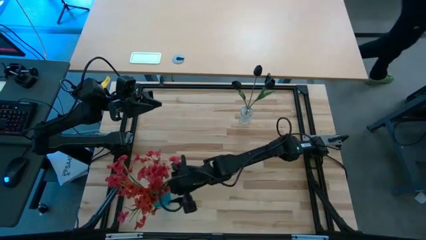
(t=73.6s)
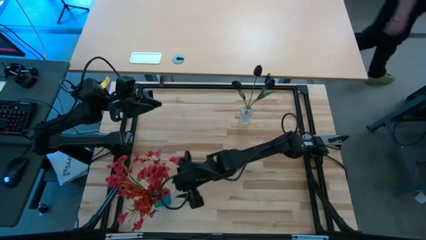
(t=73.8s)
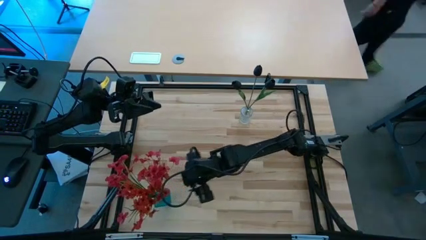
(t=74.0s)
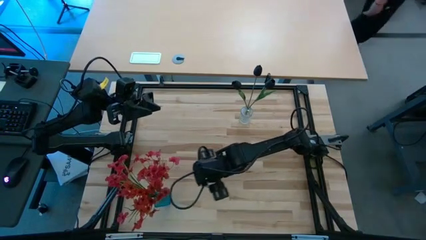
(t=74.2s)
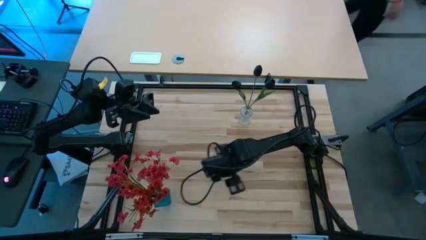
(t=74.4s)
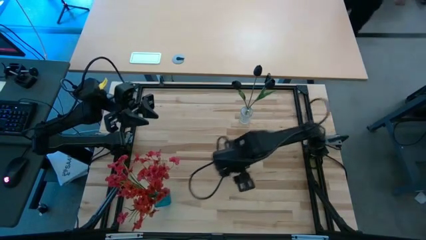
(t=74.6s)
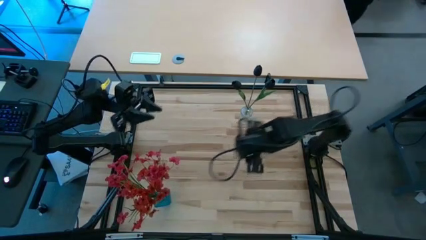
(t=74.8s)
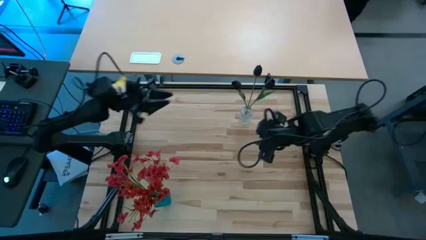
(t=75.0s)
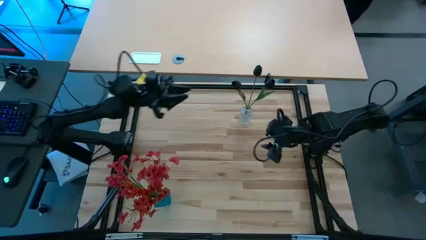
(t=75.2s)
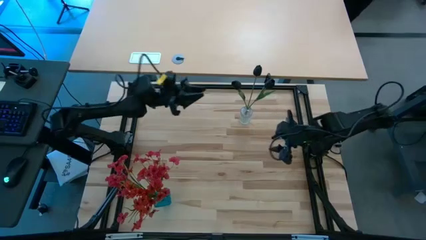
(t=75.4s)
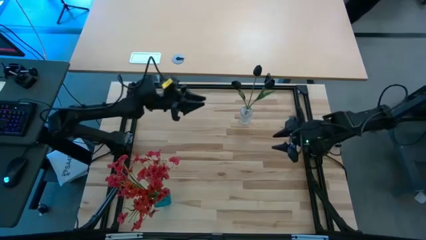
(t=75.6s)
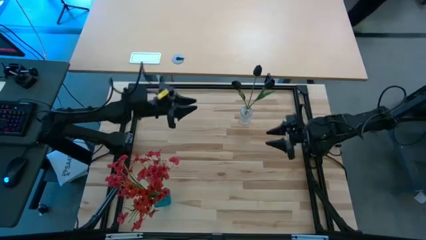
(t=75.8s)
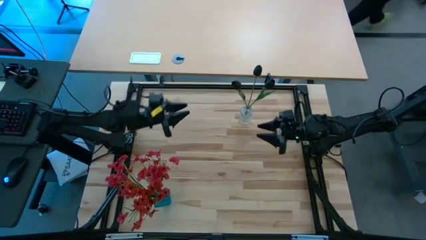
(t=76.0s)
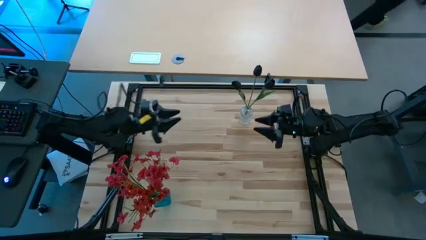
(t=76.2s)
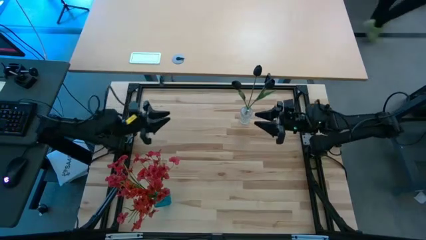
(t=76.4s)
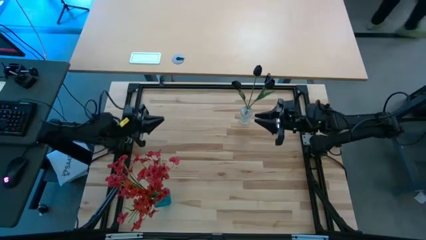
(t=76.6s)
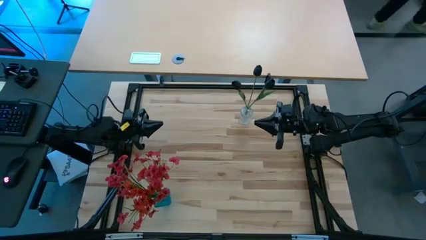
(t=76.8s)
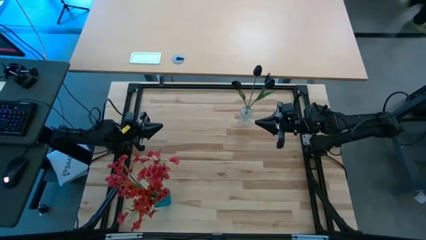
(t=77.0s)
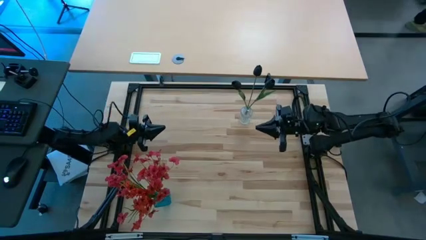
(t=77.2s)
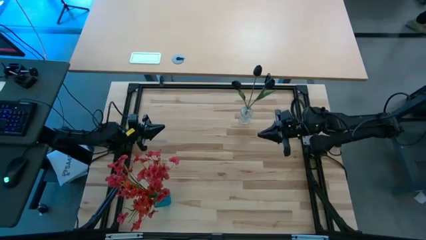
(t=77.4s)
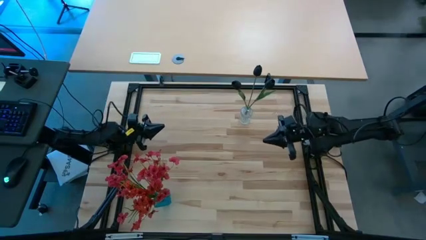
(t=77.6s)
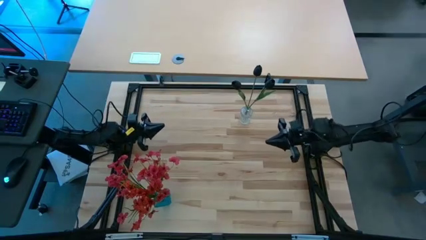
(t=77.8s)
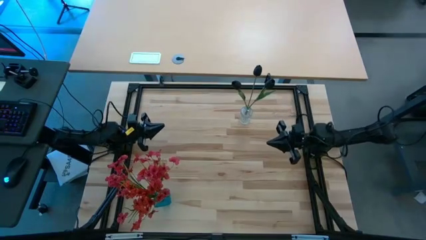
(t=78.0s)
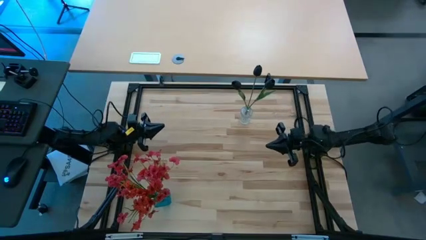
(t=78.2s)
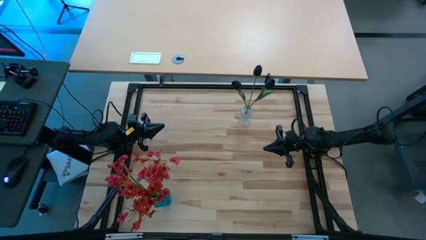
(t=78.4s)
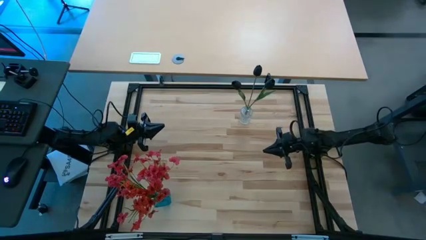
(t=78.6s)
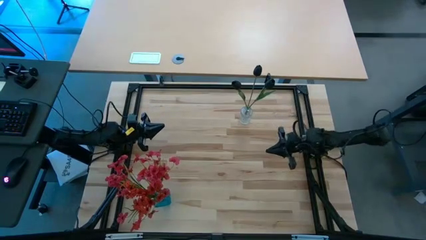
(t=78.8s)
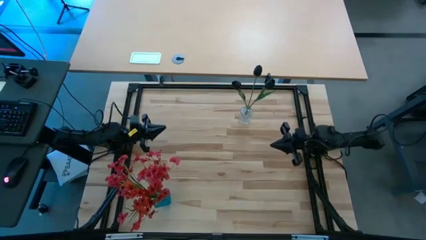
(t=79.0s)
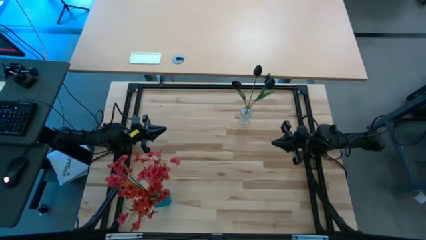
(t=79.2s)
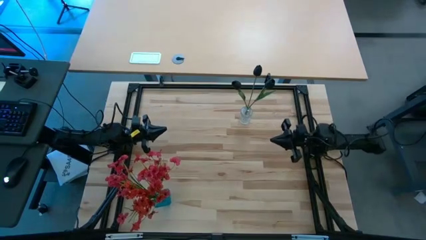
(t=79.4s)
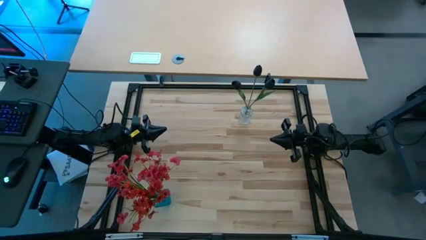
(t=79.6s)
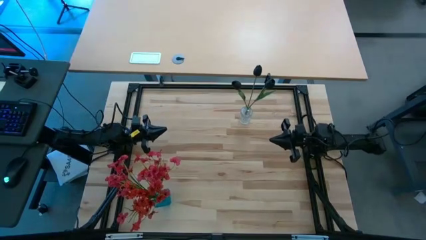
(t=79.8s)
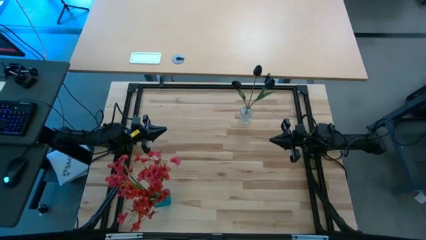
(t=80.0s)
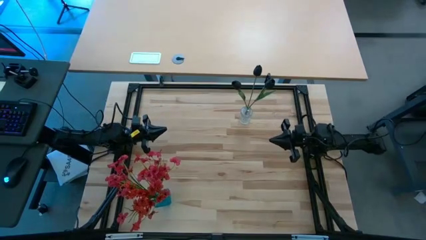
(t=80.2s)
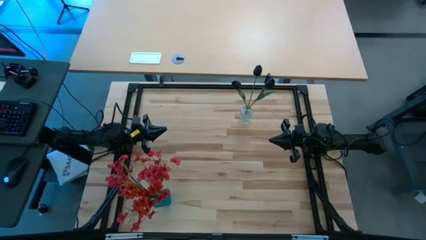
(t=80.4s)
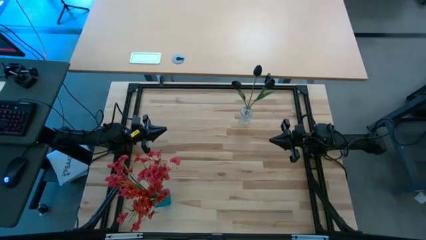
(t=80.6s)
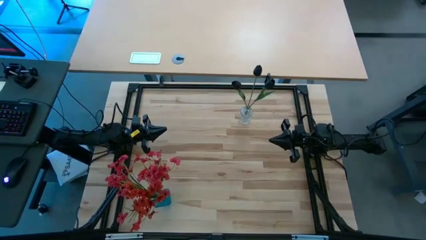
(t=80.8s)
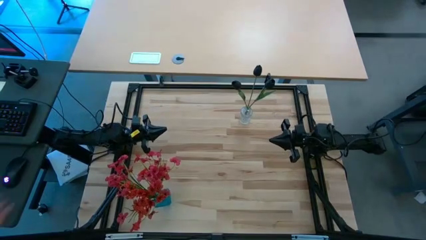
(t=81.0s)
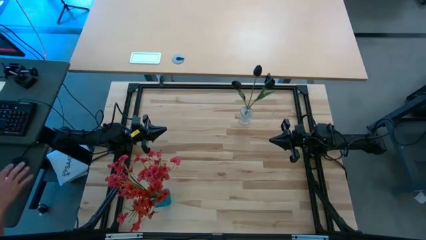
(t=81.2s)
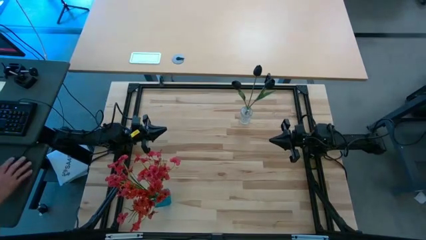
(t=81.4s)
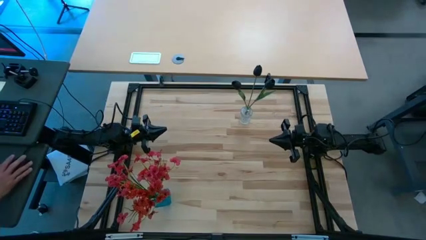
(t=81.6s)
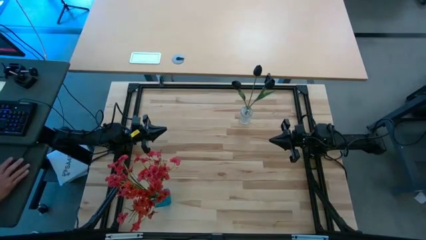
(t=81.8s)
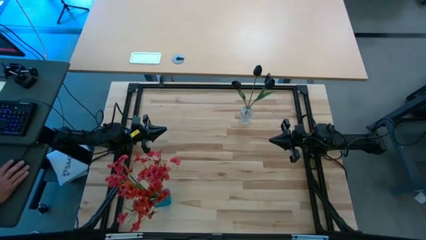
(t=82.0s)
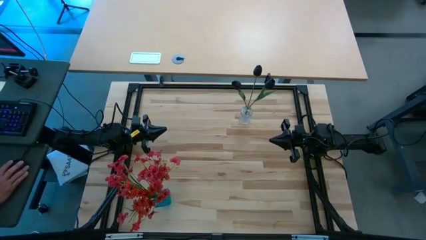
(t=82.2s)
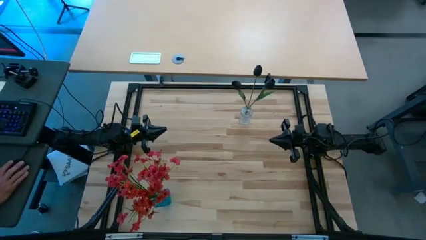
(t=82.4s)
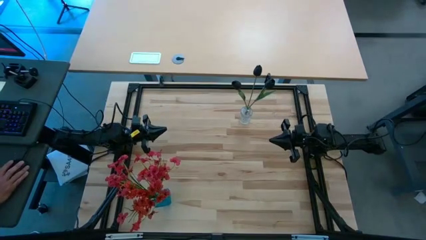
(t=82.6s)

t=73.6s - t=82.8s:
Task: Sort flowers into vase by color
Return to Home Position
